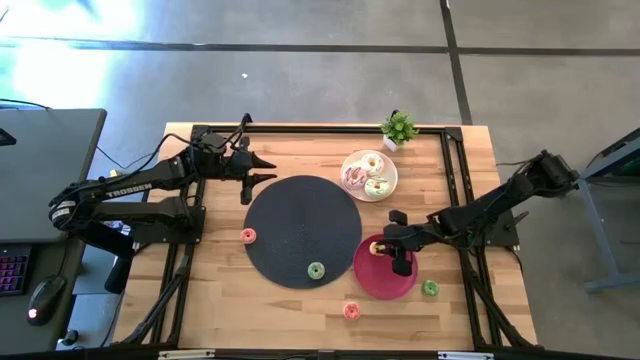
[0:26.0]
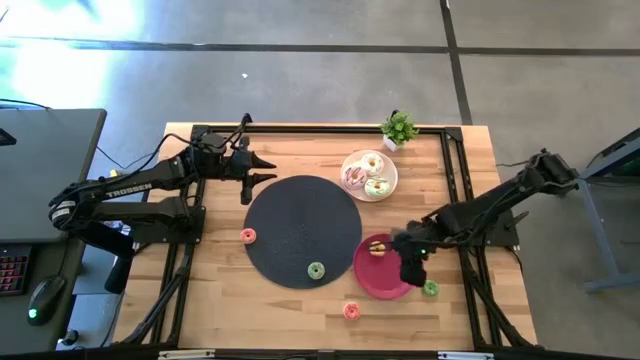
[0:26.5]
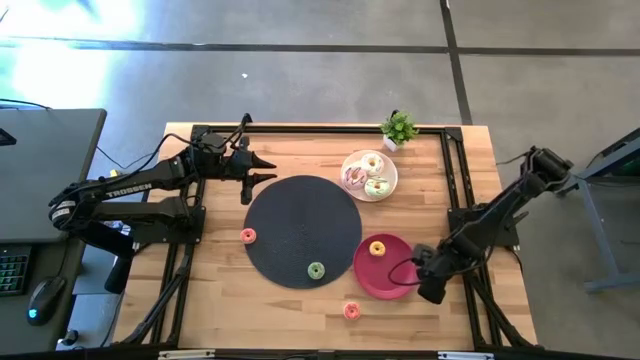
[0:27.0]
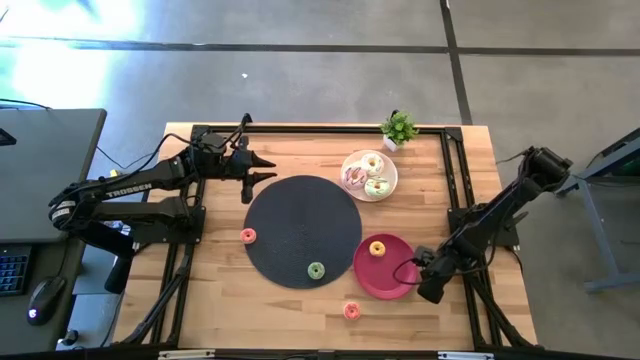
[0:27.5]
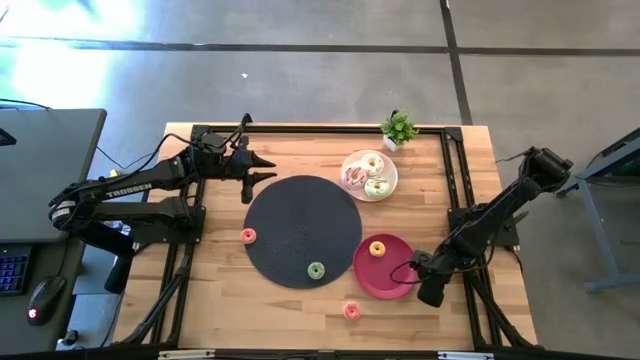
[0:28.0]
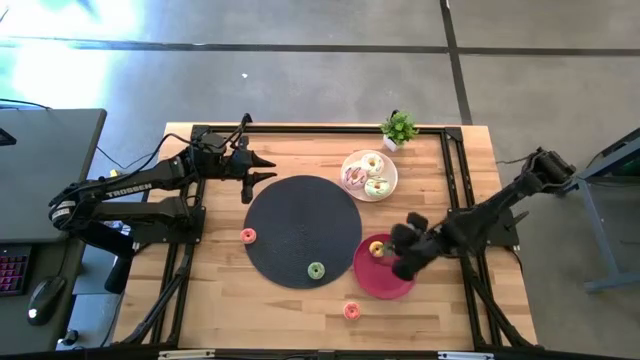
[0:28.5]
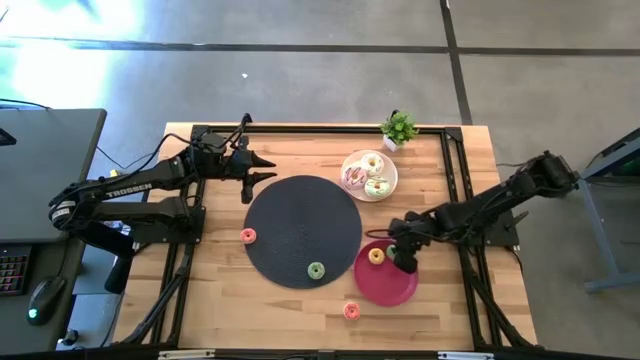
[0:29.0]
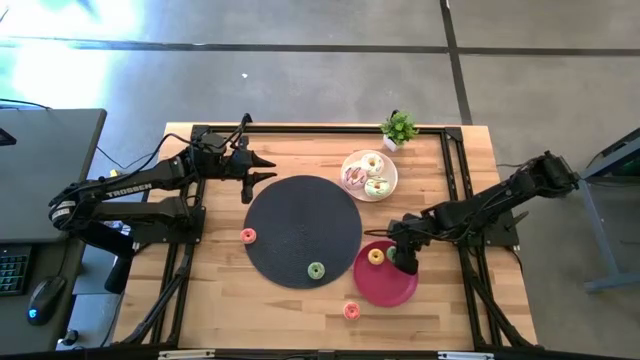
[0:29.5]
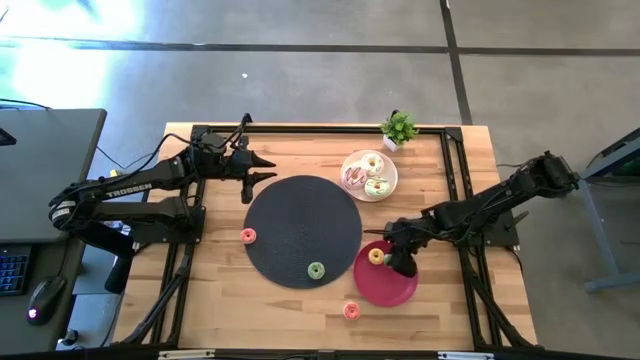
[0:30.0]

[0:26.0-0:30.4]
Task: Pick & Place donuts
Put the right small green donut into the red plate

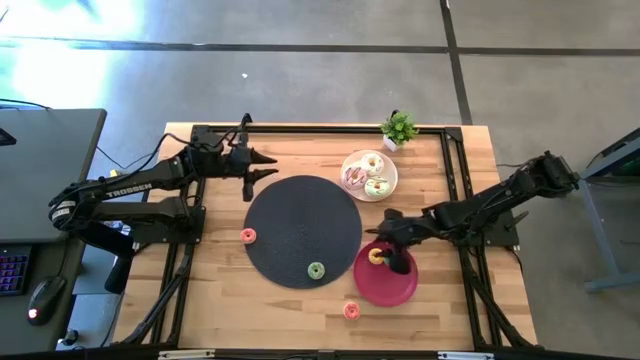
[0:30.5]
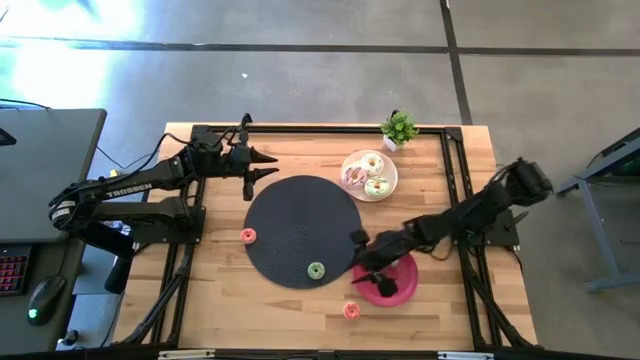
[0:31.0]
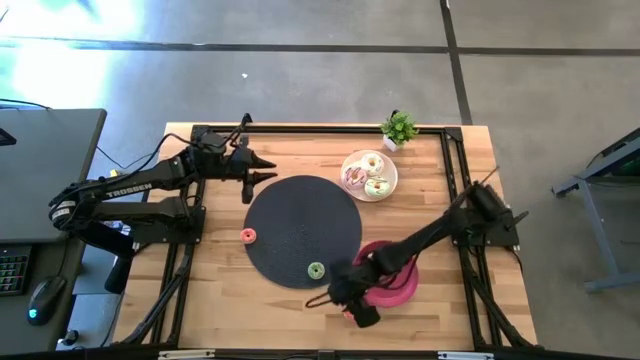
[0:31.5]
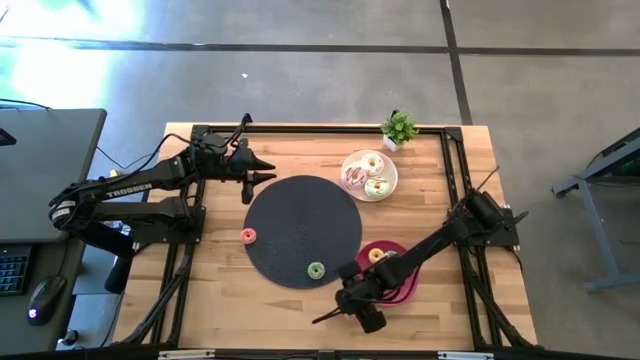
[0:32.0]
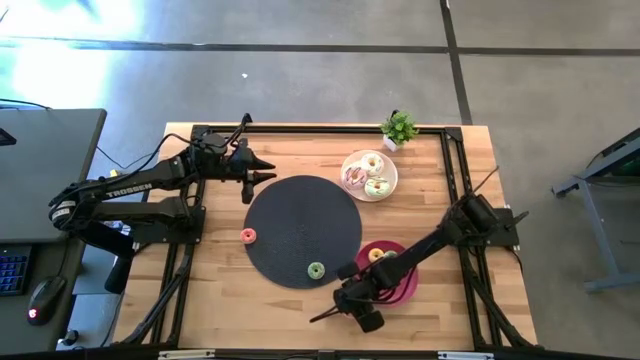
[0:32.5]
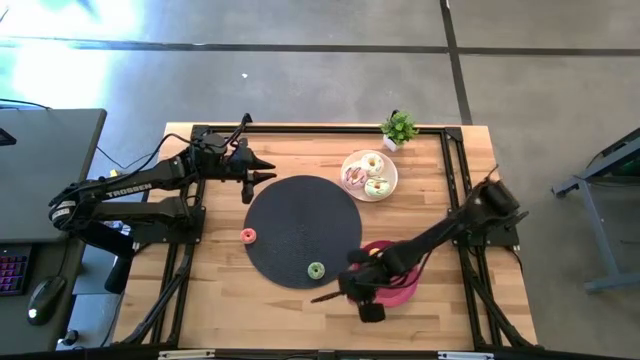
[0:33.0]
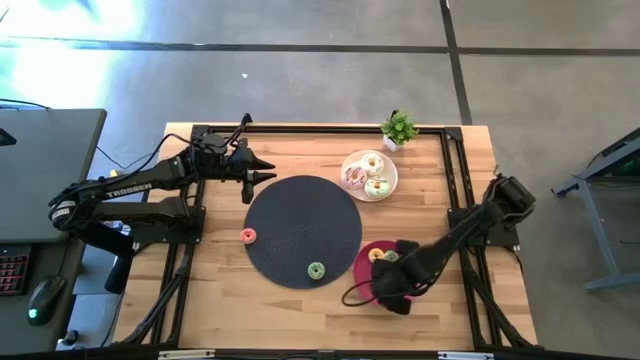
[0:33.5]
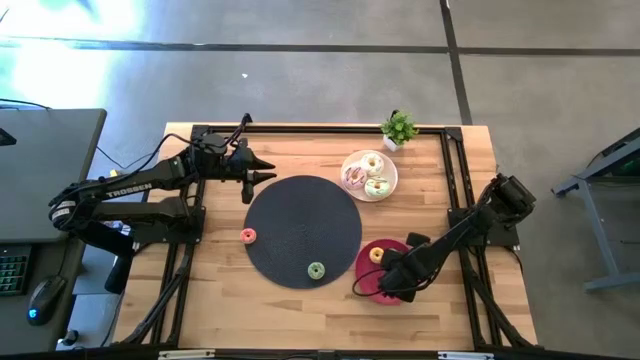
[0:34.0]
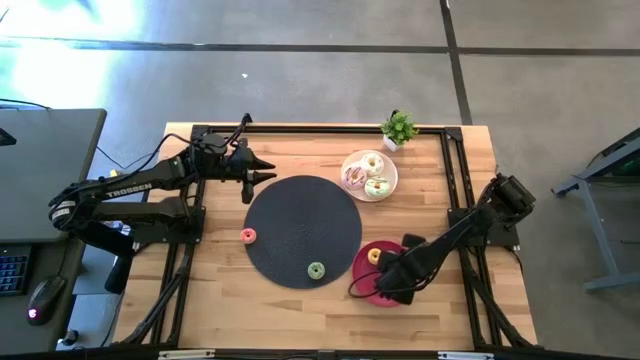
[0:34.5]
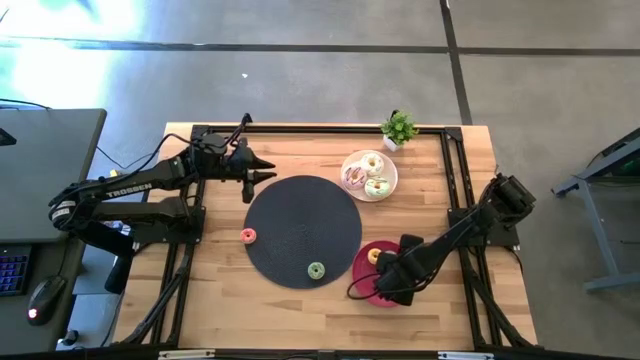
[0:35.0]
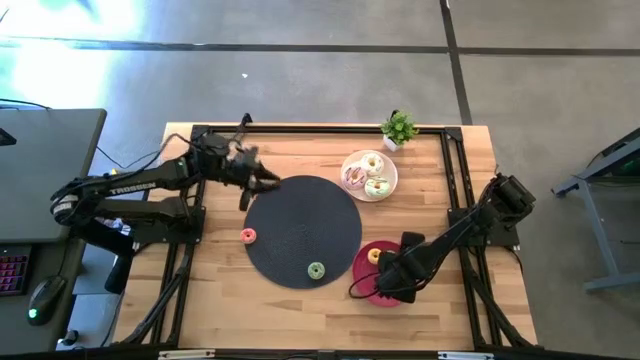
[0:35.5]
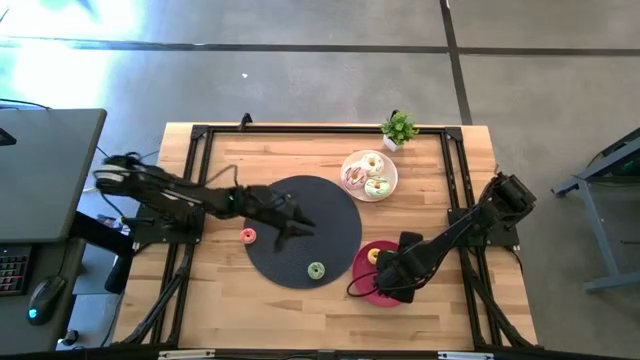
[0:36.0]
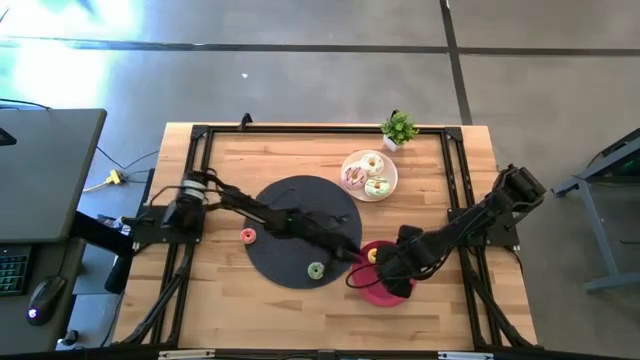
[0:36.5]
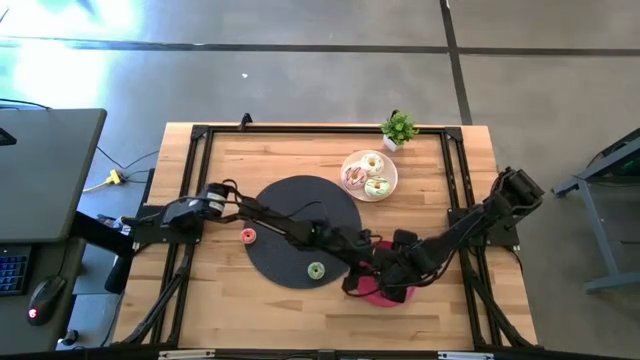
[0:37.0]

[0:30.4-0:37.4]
Put the right small pink donut into the red plate

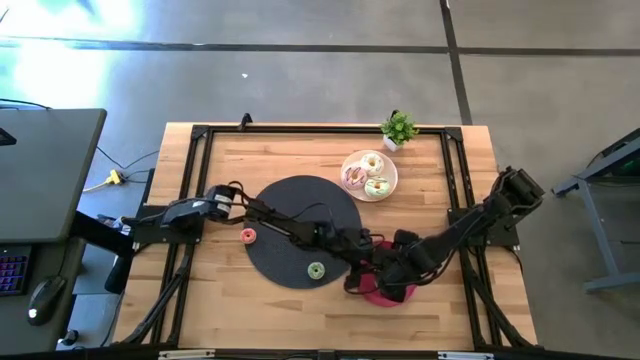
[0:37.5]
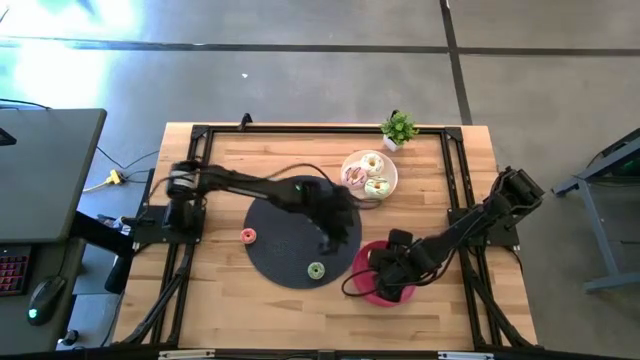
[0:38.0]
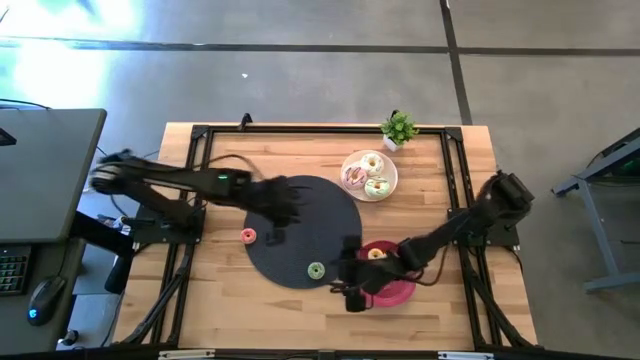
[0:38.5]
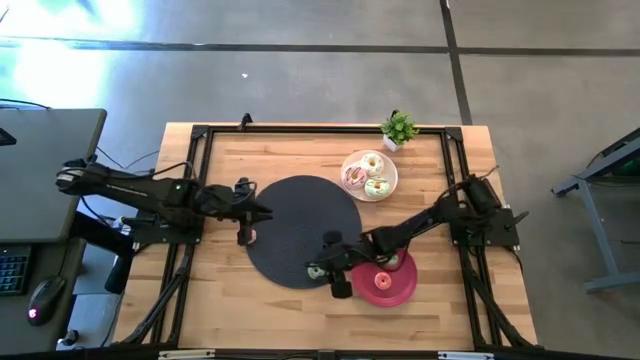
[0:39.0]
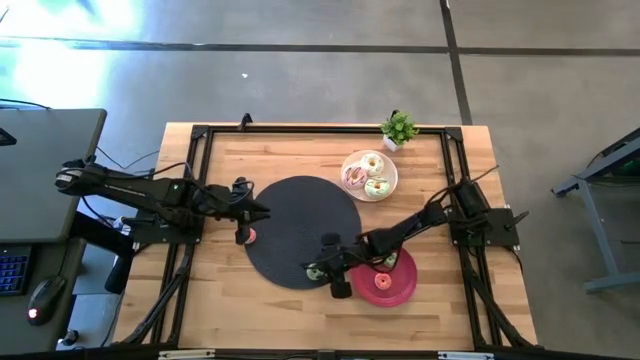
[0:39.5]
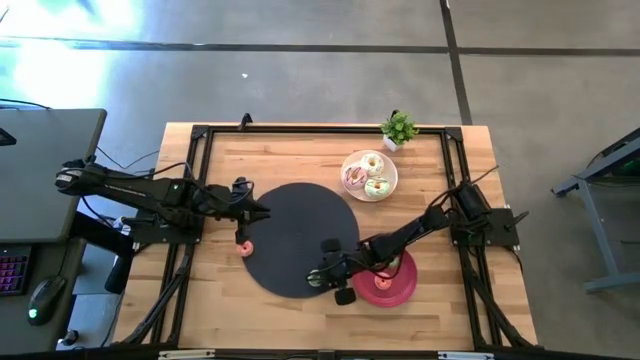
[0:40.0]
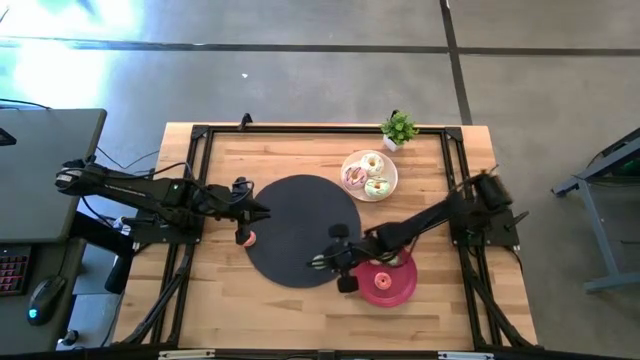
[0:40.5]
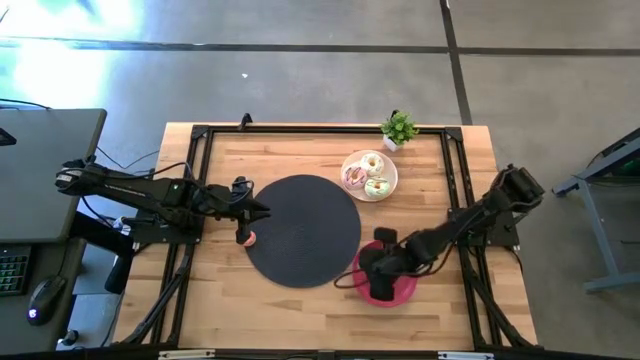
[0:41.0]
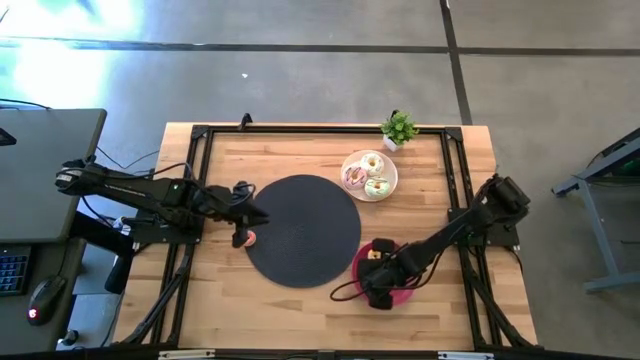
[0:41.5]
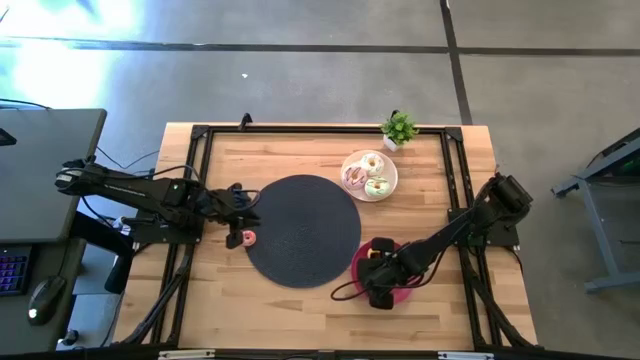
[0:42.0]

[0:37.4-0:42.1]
Put the small green donut into the red plate

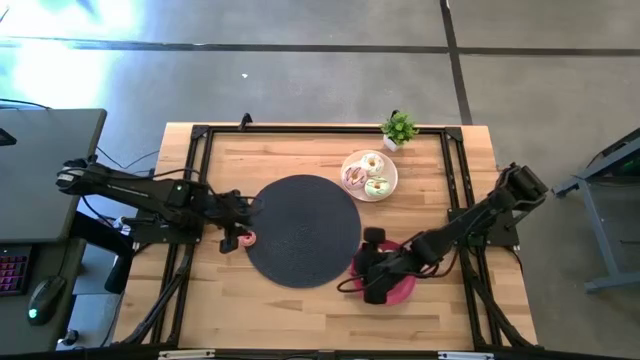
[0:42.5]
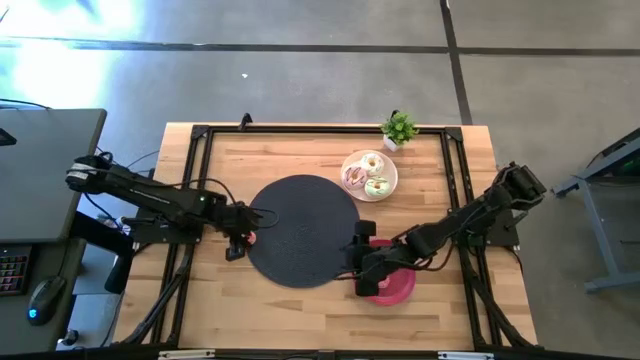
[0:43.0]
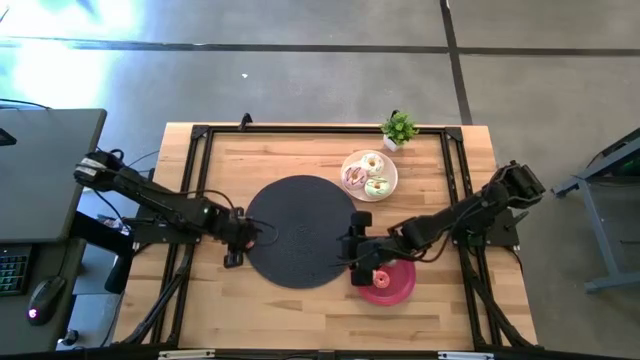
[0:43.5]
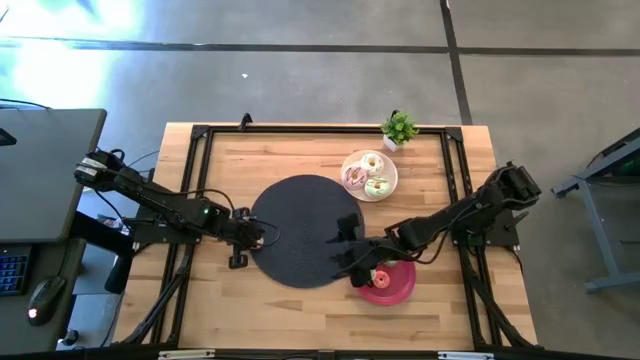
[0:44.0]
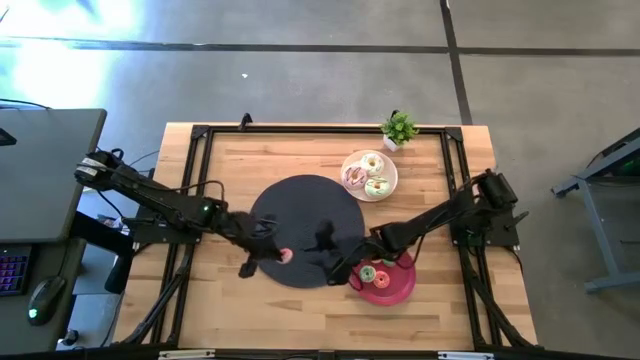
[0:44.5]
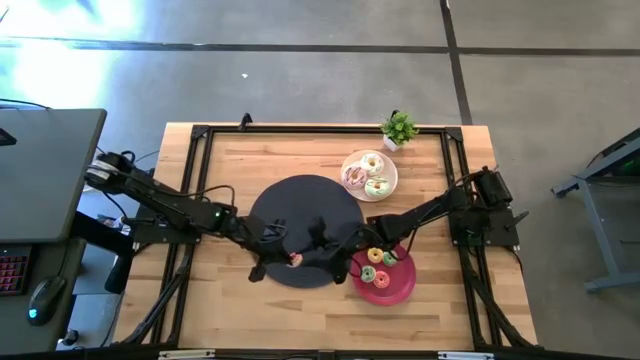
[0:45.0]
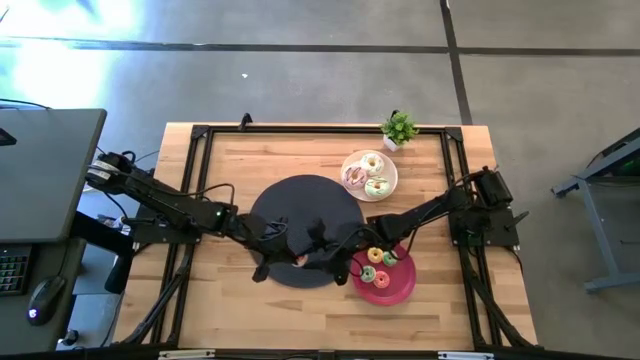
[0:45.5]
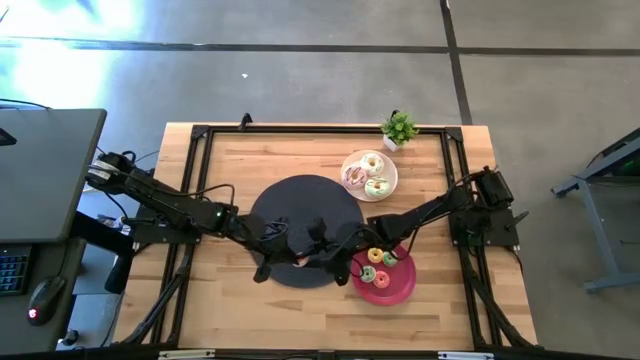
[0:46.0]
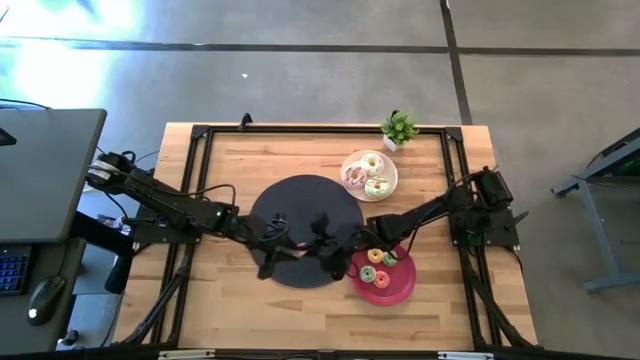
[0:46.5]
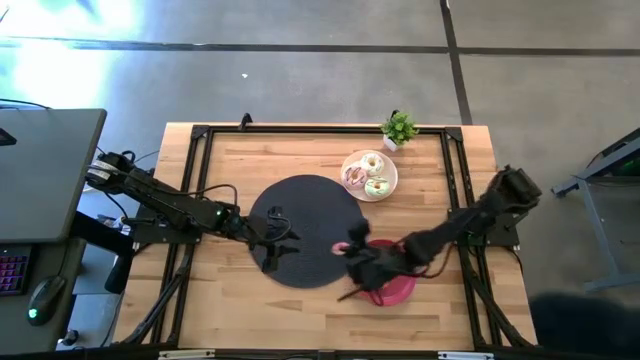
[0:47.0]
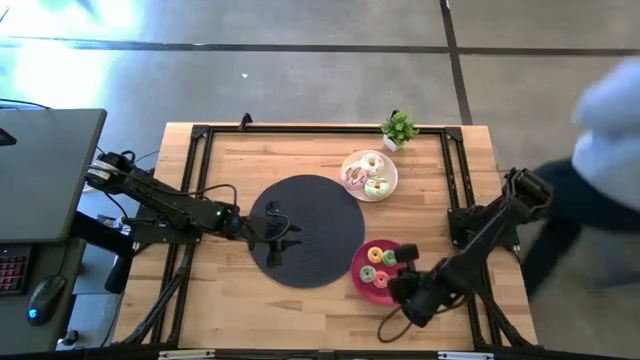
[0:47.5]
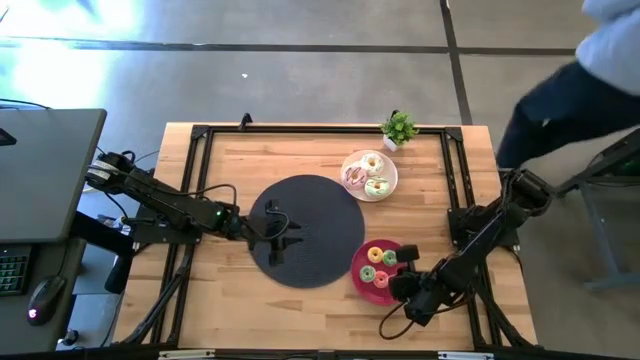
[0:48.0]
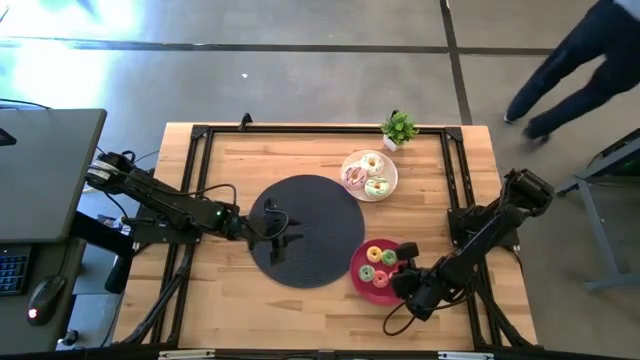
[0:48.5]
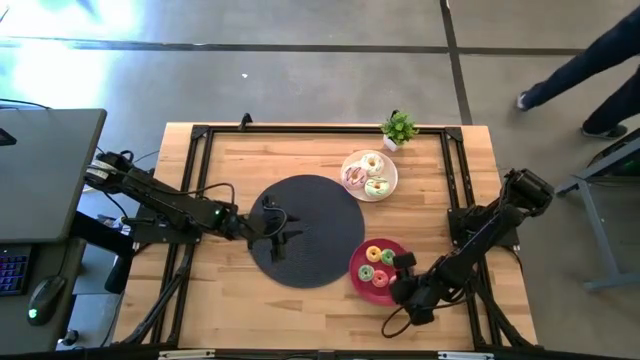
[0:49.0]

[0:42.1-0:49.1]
Put the small pink donut into the red plate
